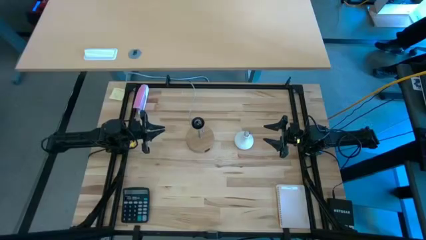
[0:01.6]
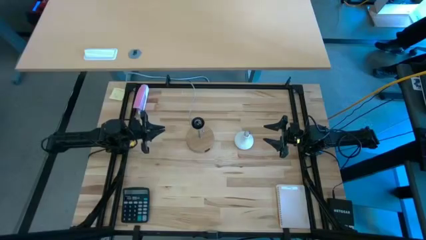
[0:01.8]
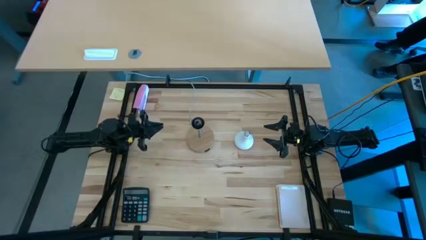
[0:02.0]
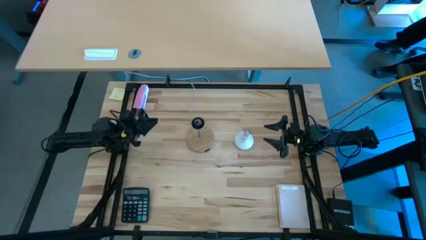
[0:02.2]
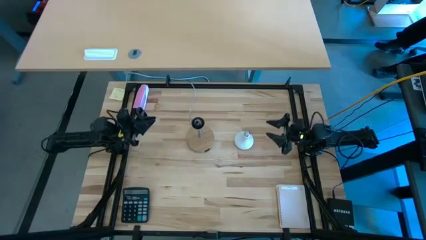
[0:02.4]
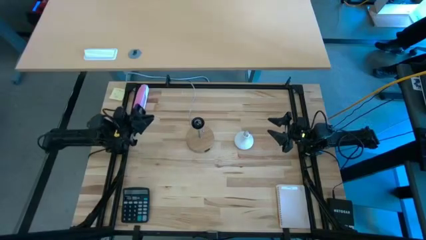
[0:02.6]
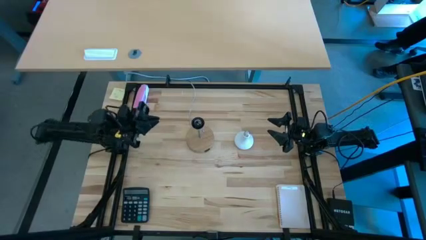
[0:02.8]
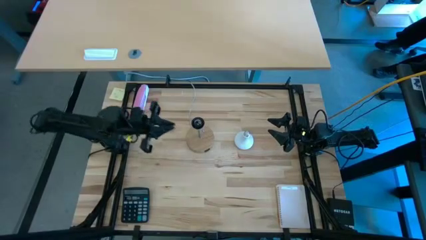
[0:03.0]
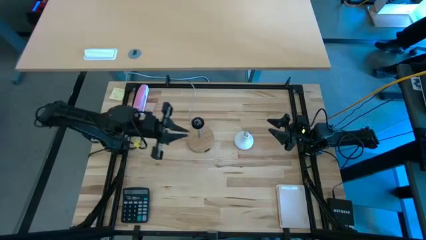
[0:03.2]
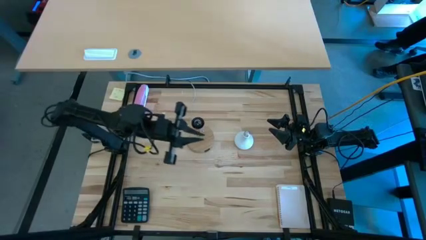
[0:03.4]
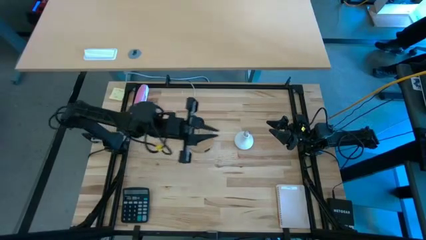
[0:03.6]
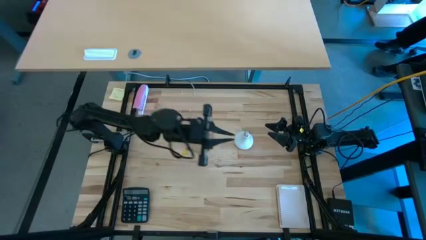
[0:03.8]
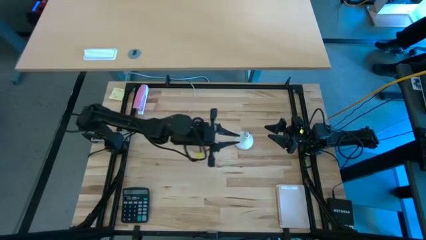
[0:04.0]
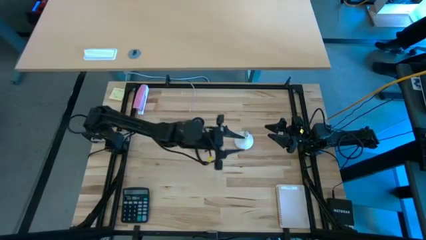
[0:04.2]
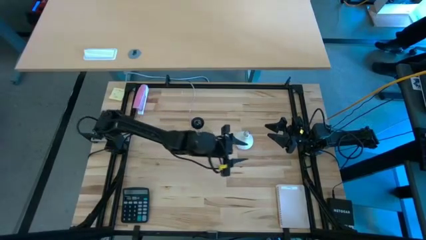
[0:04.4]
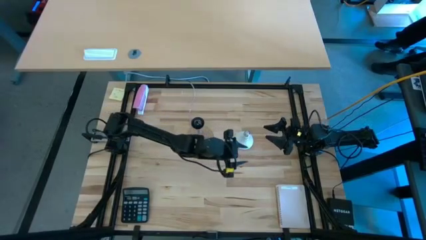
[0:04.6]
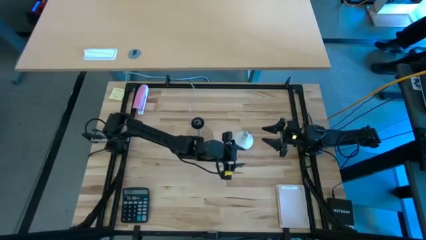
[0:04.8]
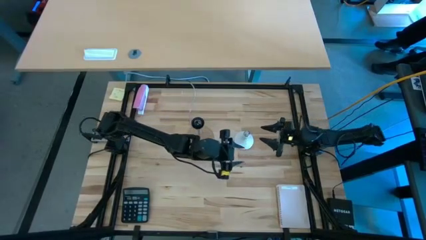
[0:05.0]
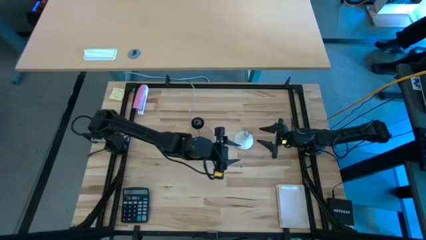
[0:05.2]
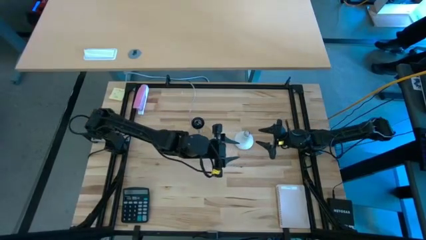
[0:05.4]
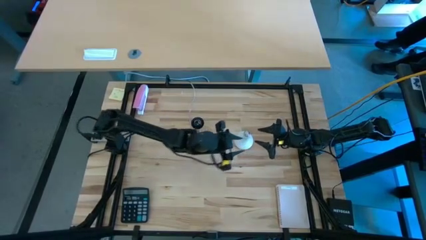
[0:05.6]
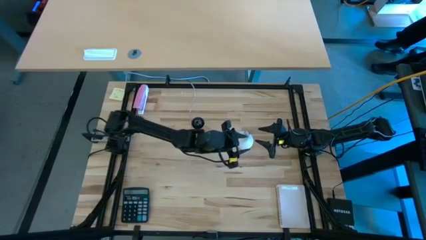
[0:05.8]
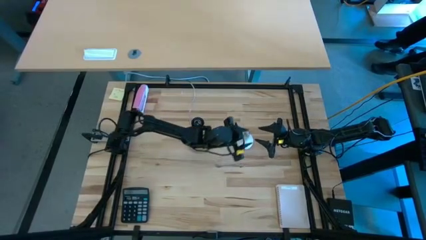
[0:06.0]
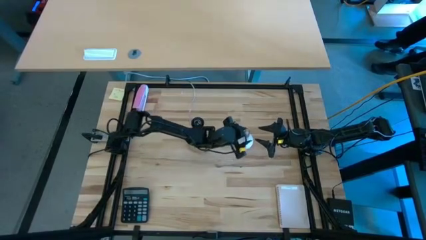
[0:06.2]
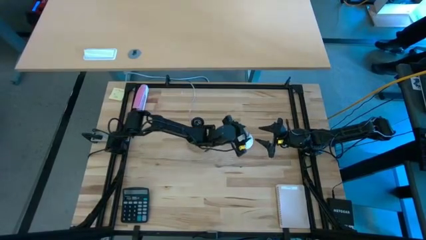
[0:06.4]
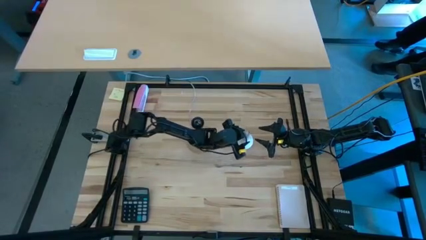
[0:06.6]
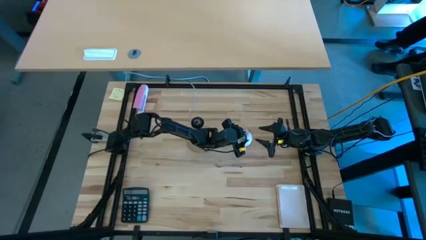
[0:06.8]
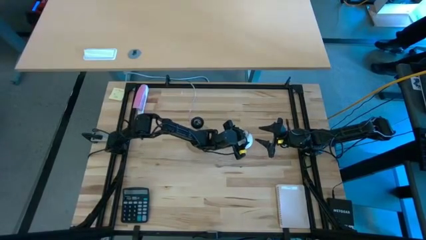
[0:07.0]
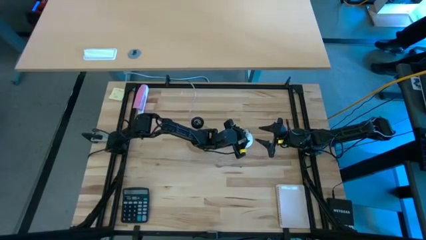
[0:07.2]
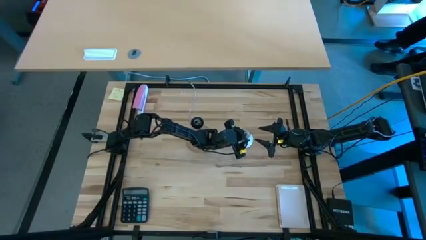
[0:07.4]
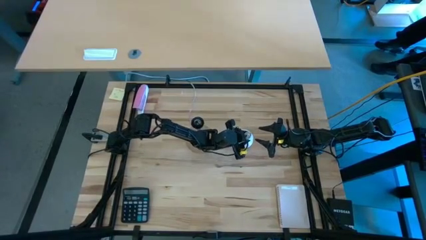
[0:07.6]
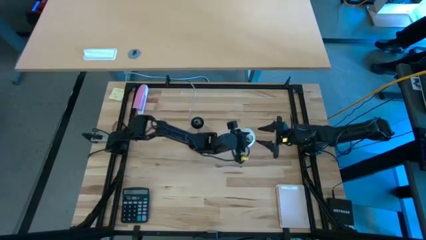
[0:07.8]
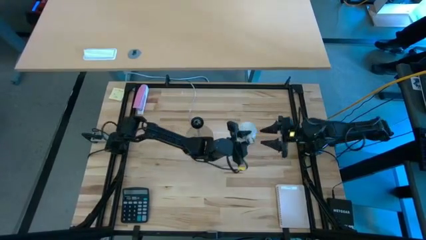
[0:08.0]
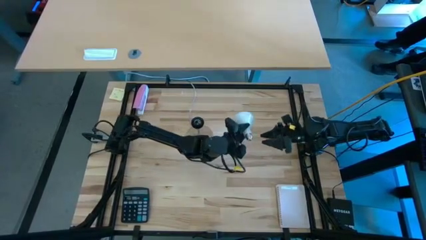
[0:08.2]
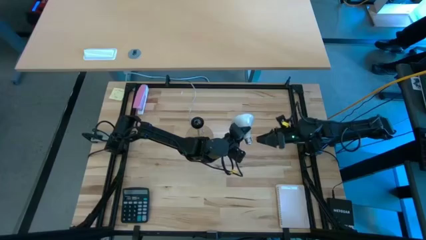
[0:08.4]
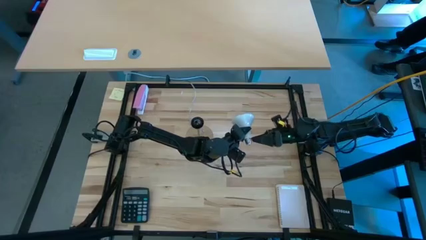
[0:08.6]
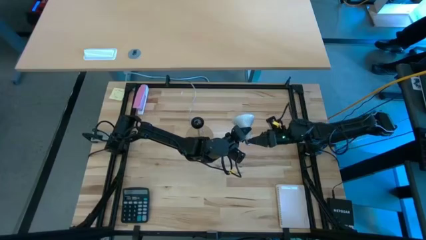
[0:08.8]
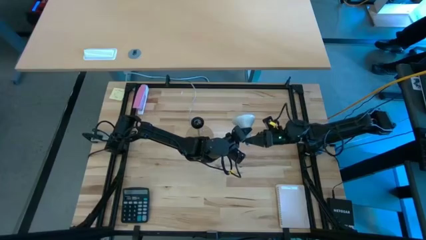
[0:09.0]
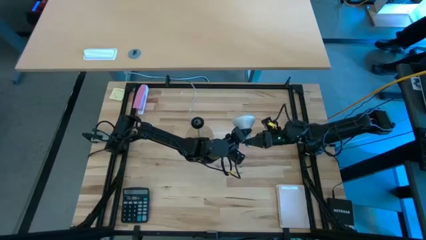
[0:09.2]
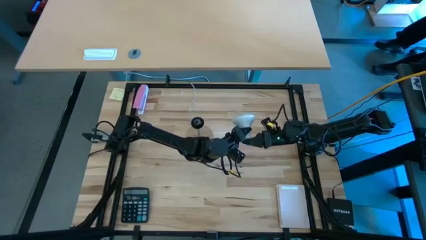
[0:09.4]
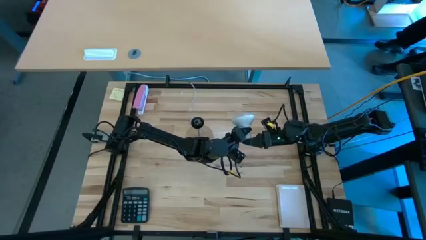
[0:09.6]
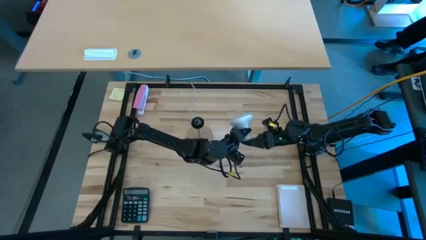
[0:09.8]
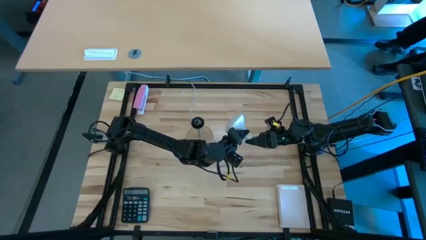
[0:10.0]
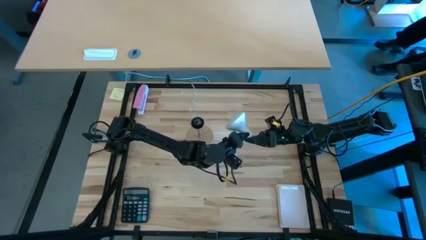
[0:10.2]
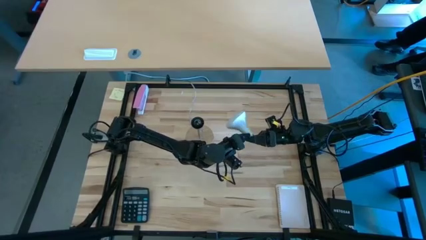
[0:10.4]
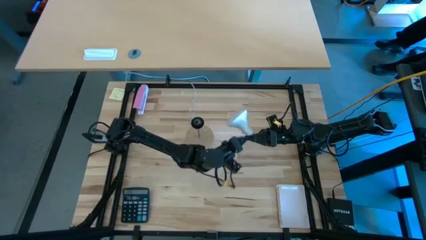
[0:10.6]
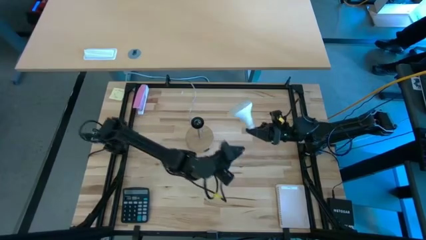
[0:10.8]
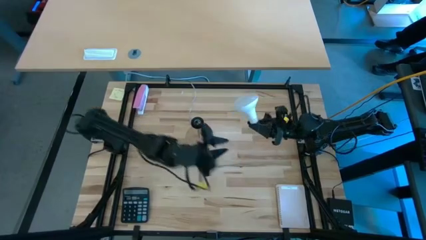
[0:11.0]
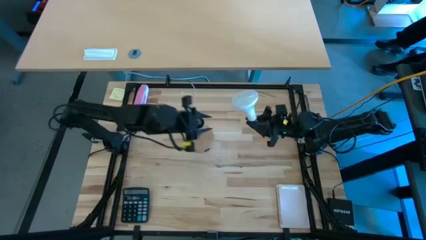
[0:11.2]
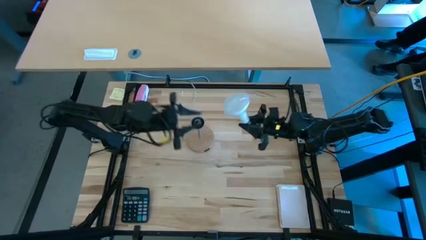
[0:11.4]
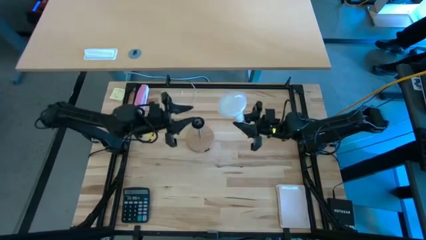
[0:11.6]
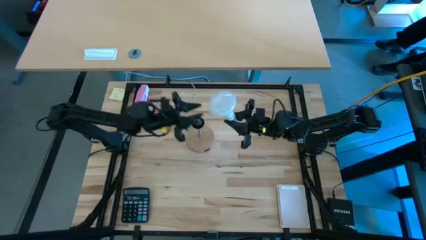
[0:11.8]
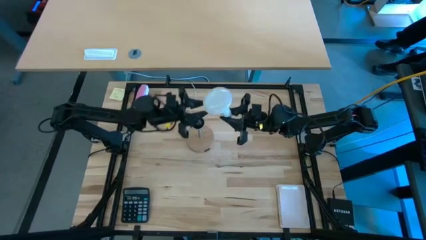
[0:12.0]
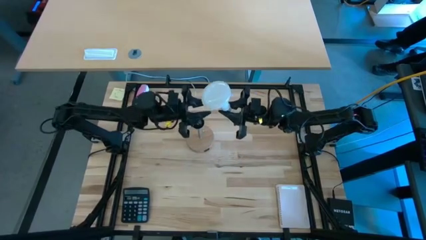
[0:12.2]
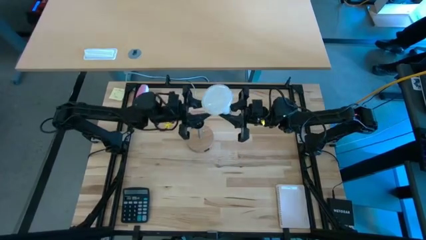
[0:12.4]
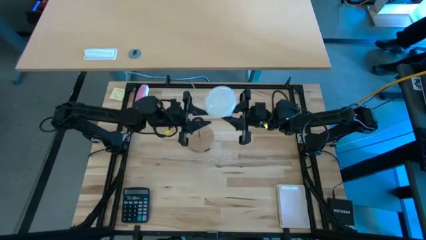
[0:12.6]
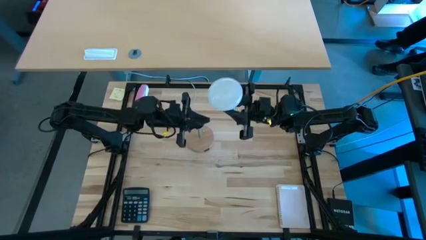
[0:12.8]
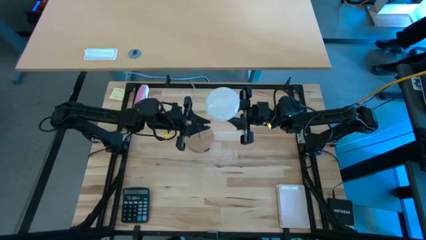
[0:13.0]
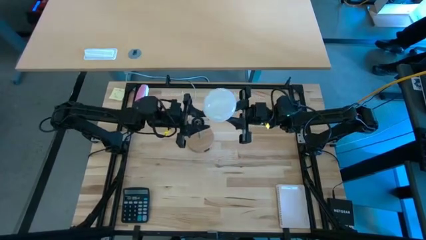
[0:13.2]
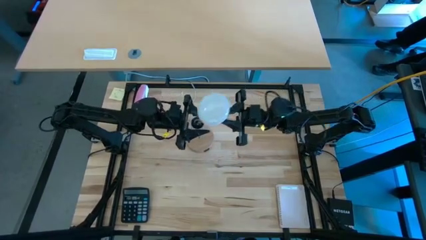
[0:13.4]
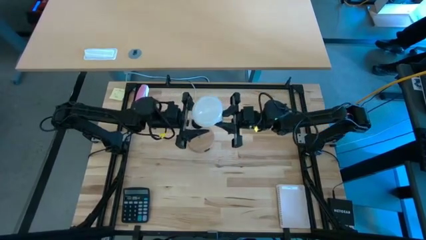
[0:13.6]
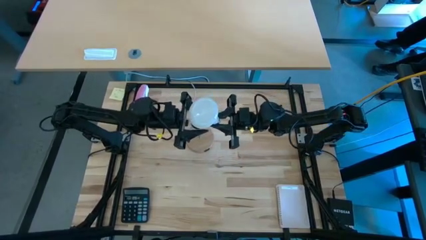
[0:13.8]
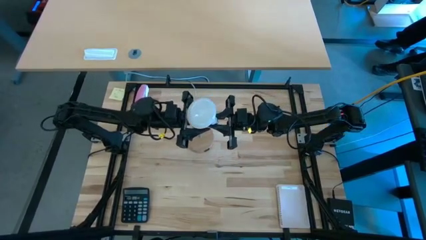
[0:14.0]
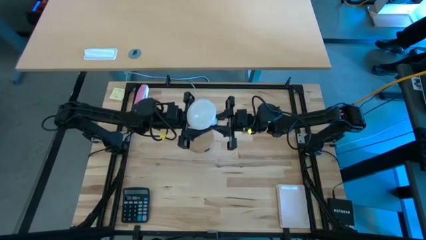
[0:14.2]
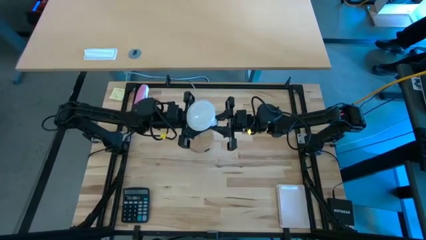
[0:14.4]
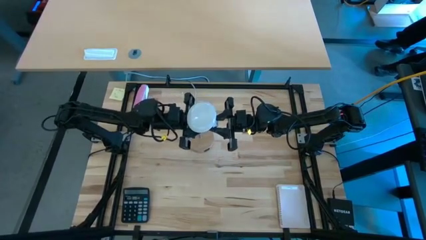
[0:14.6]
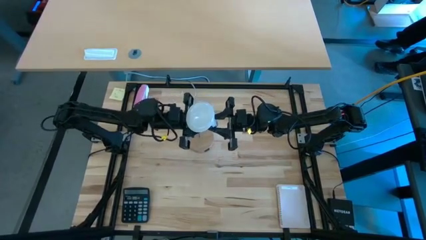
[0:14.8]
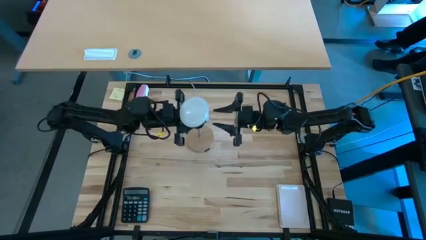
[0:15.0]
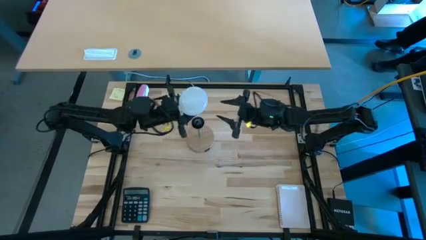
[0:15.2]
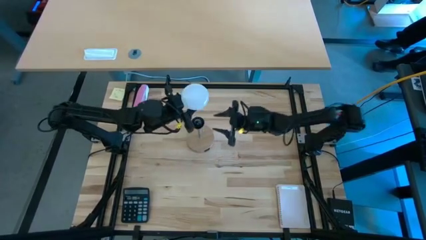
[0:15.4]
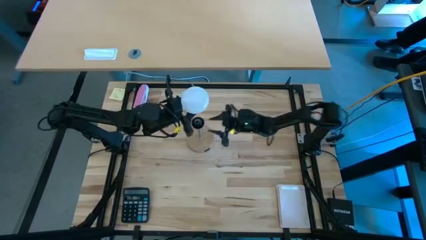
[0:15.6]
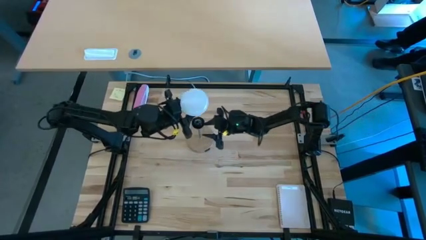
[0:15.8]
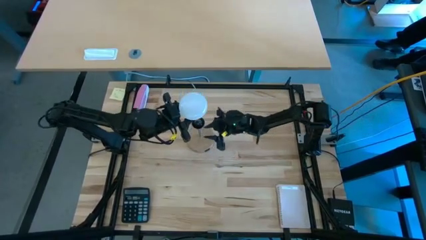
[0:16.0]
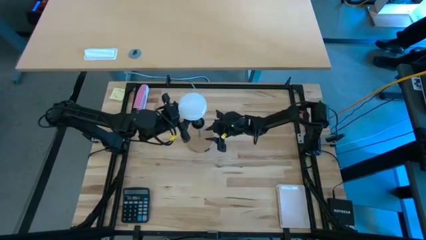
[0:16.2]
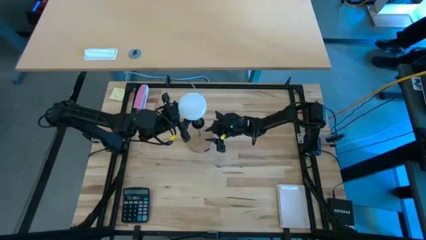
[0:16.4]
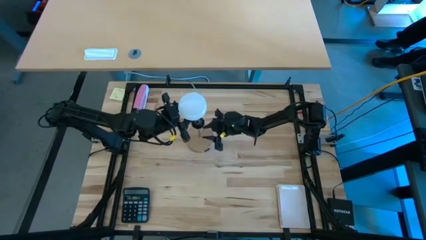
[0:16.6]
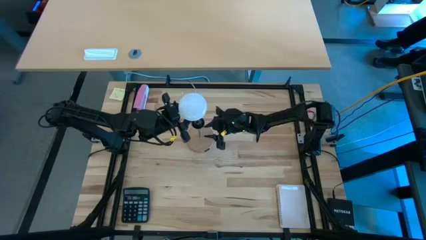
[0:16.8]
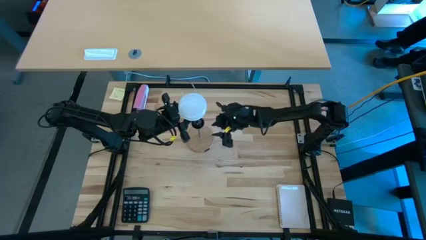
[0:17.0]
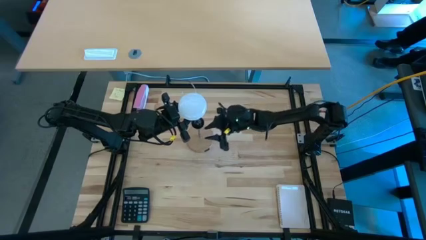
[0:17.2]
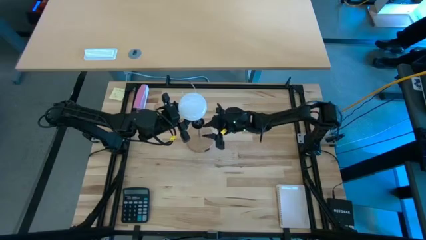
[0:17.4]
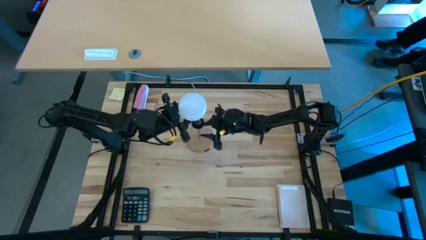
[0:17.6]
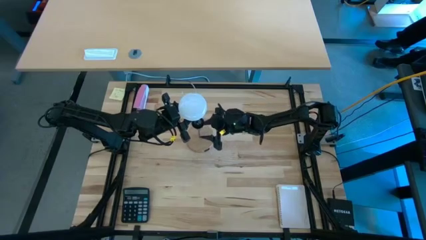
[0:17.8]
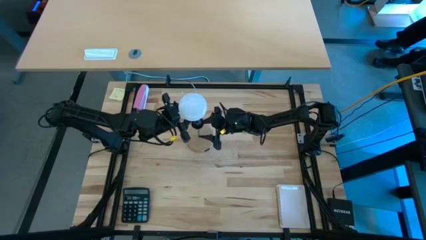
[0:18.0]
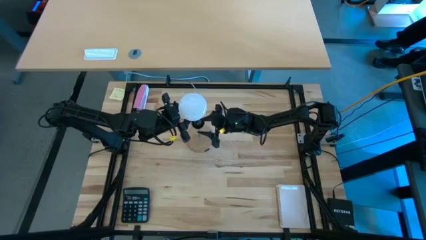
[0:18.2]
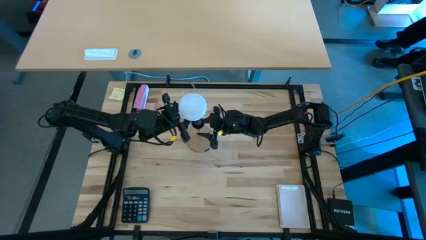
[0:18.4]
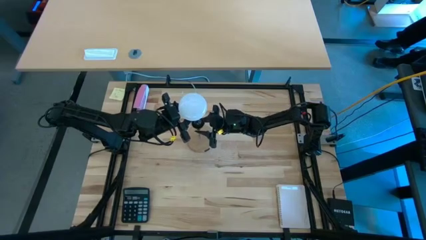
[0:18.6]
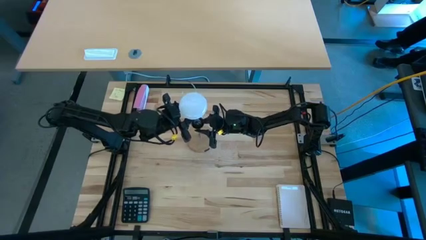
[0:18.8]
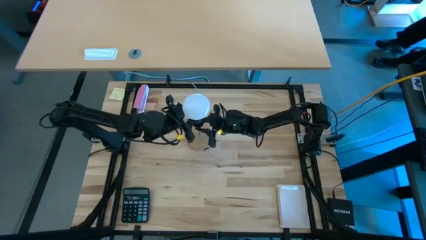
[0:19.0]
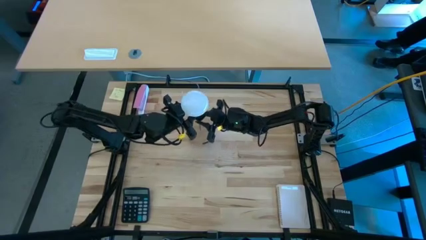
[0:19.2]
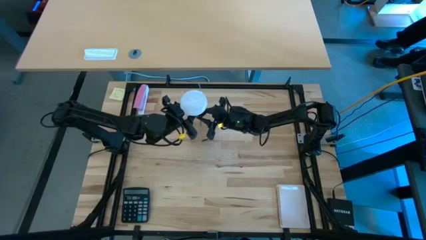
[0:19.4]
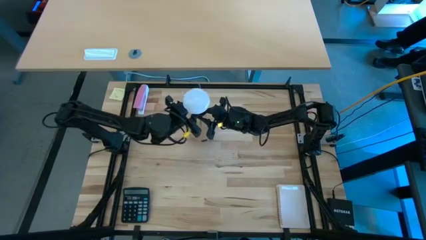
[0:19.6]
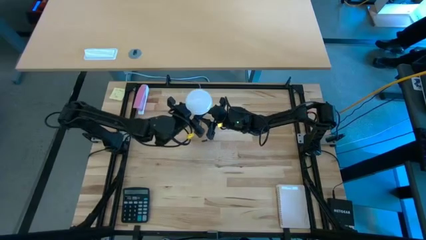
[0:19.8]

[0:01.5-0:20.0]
Task: Screw lightbulb
Insert the lightbulb into the desk lamp
